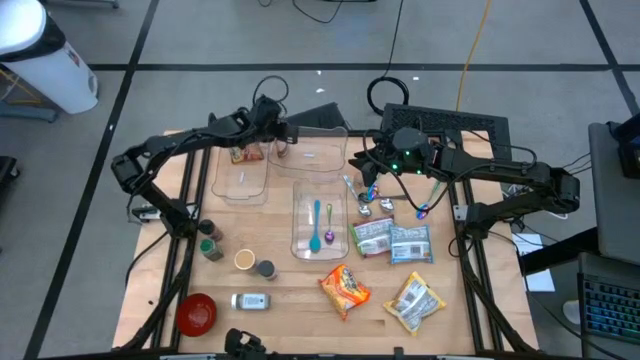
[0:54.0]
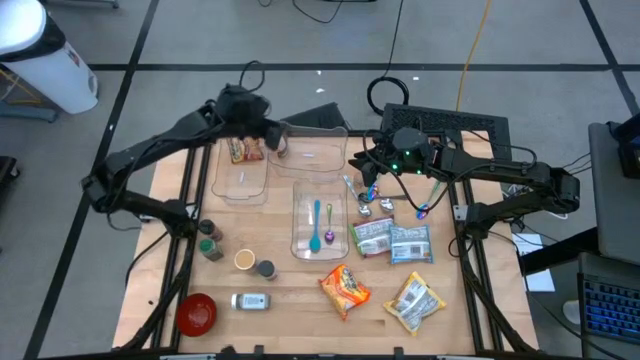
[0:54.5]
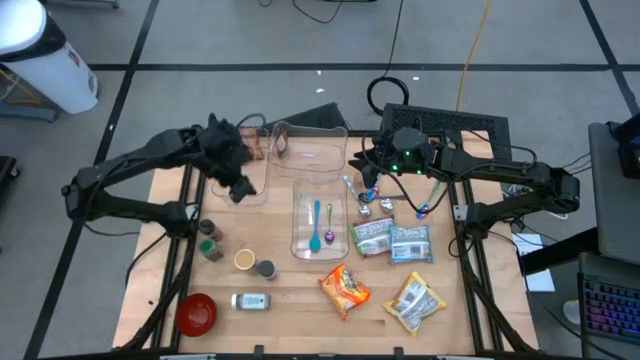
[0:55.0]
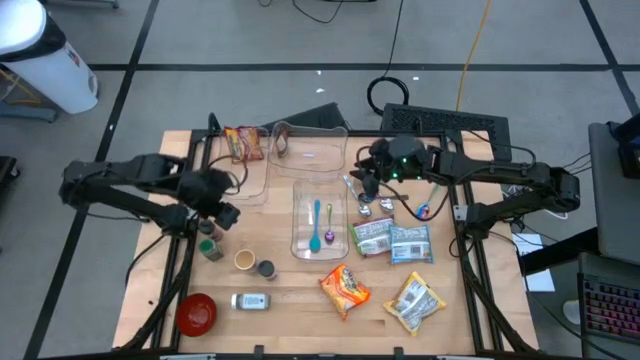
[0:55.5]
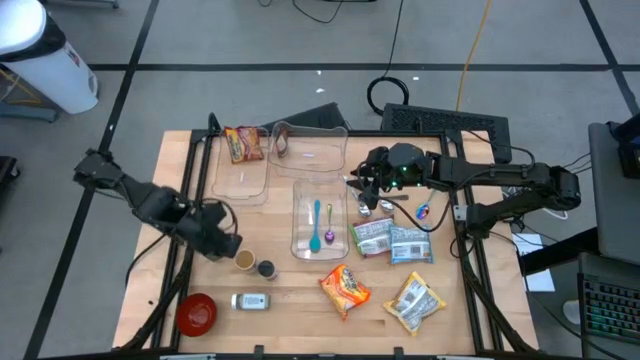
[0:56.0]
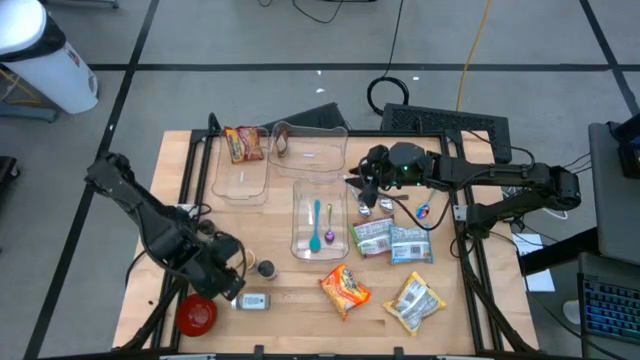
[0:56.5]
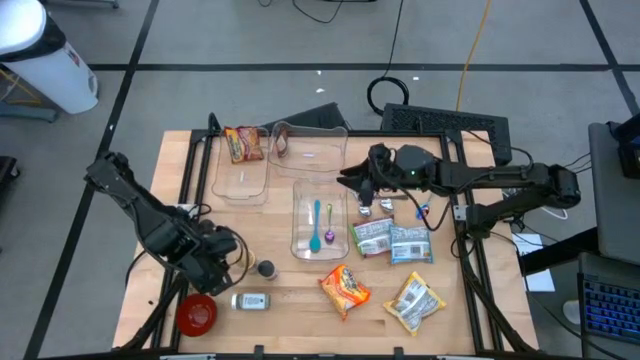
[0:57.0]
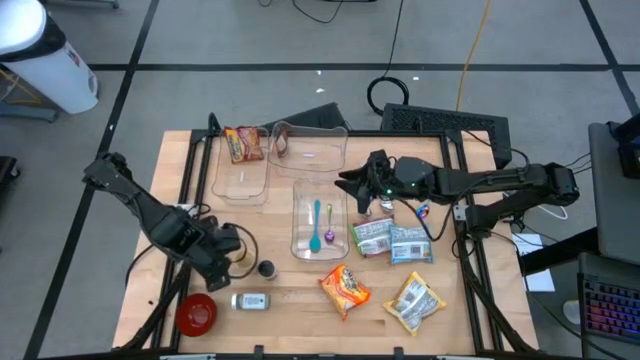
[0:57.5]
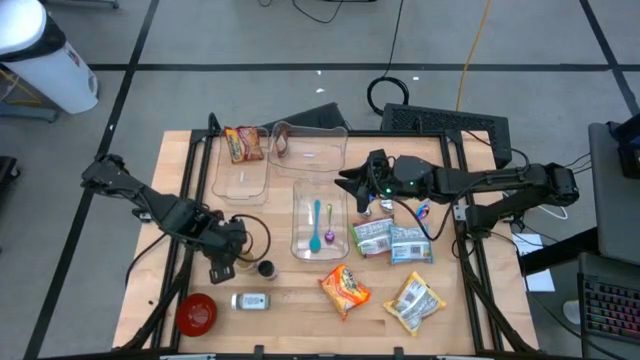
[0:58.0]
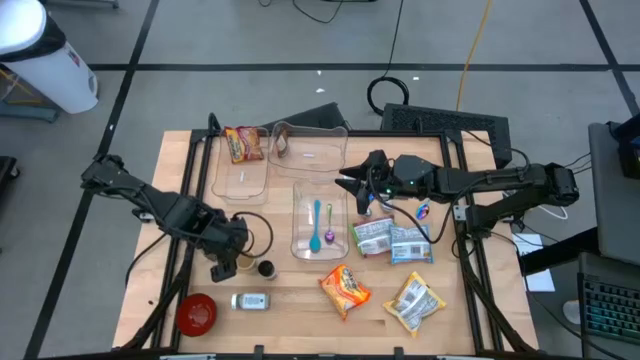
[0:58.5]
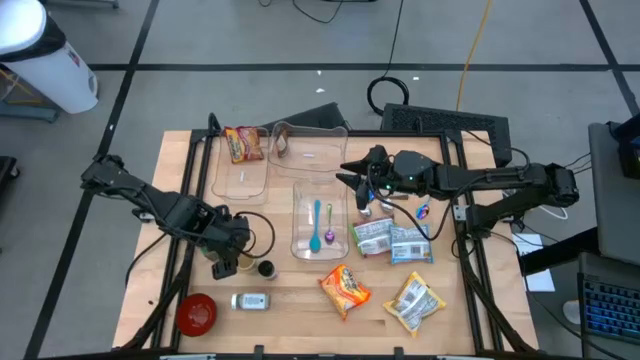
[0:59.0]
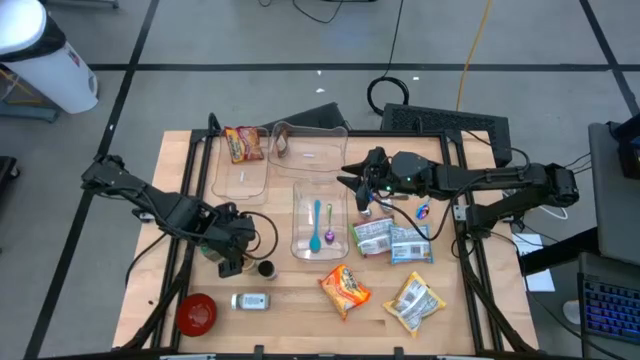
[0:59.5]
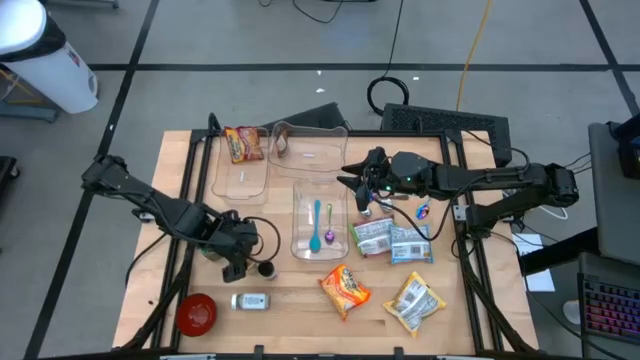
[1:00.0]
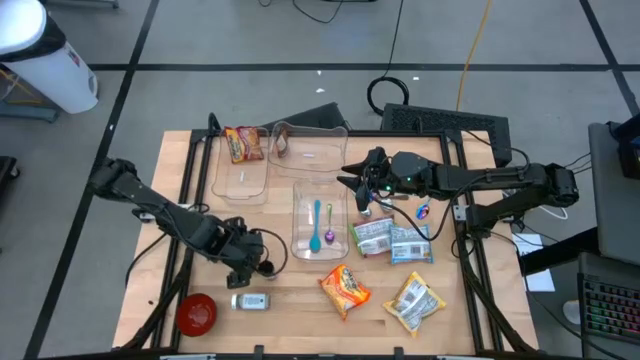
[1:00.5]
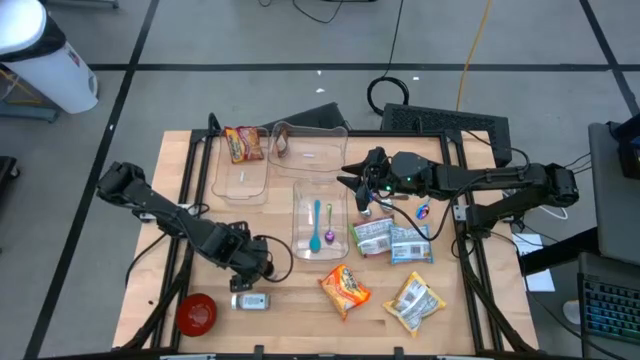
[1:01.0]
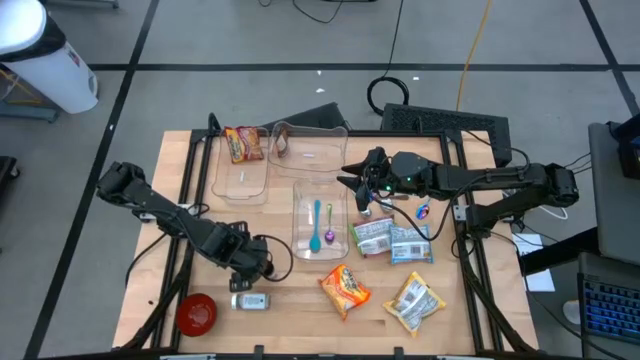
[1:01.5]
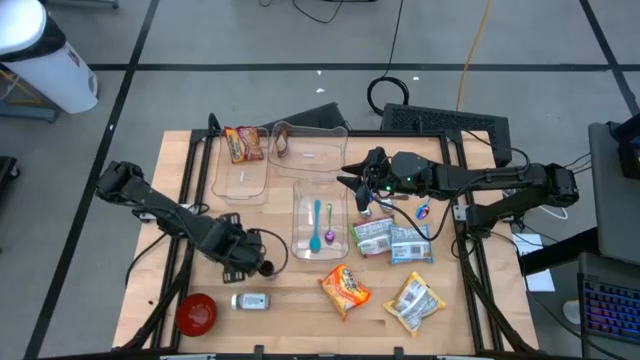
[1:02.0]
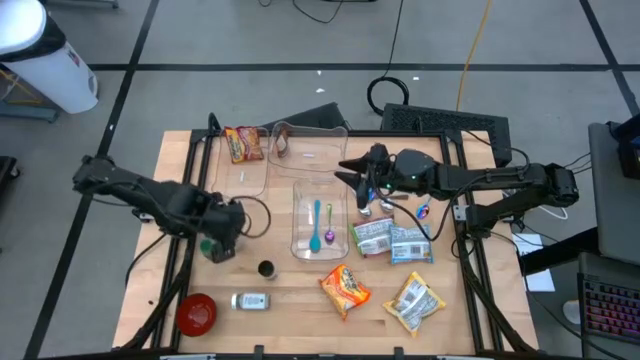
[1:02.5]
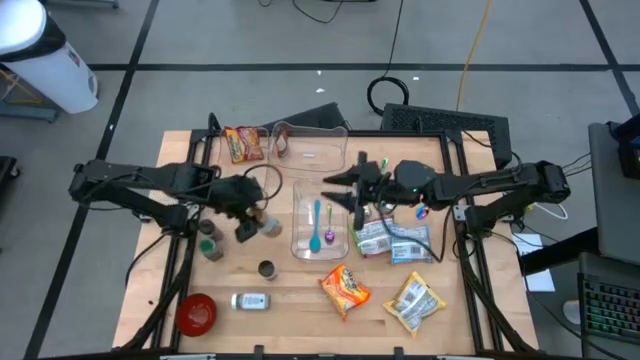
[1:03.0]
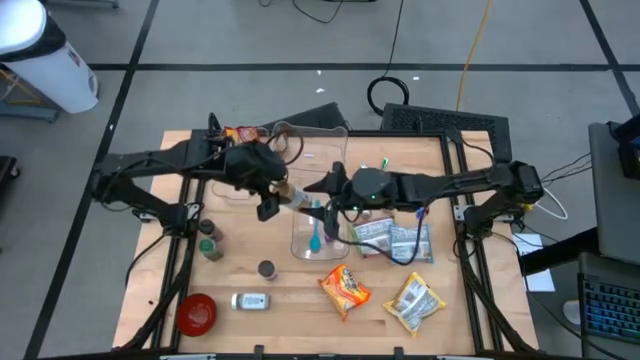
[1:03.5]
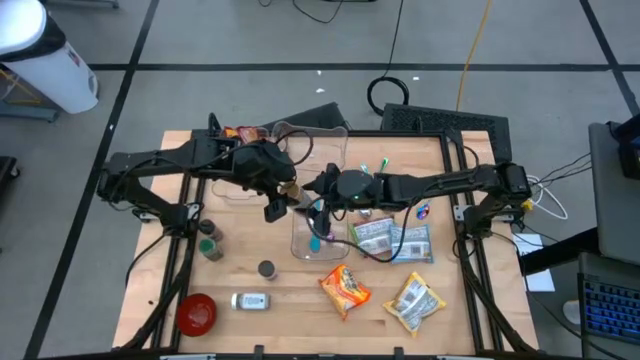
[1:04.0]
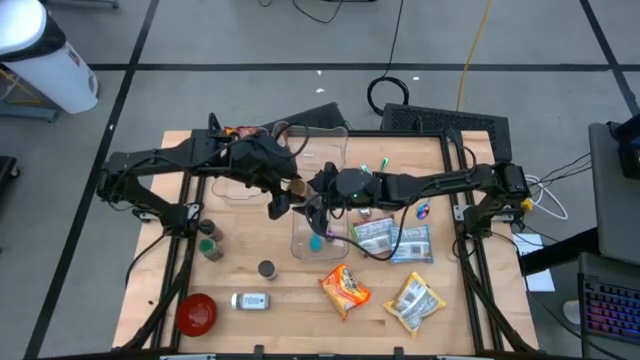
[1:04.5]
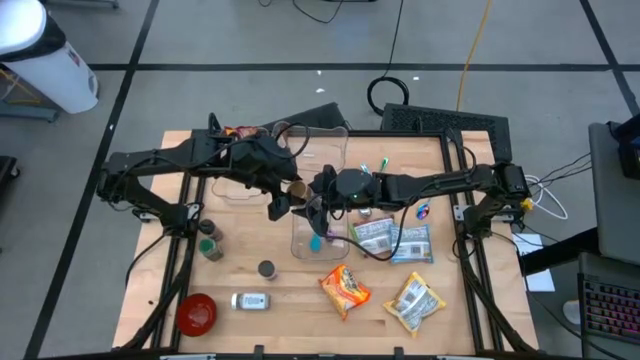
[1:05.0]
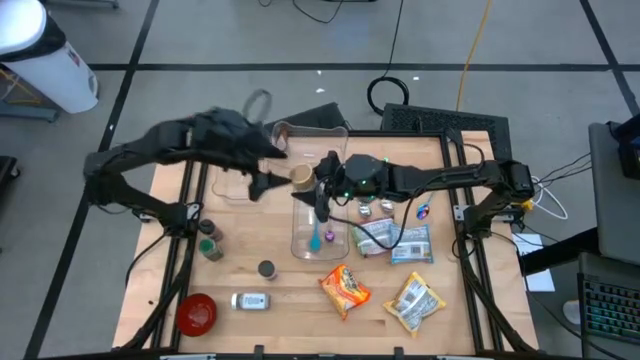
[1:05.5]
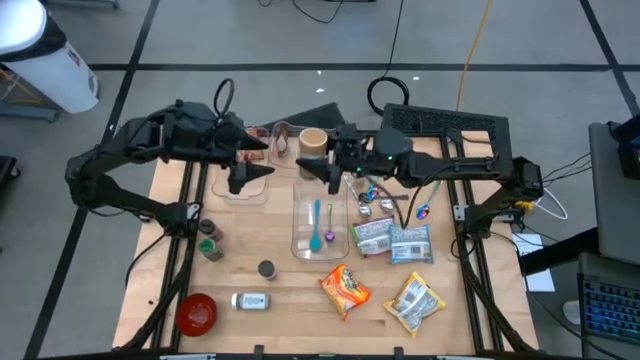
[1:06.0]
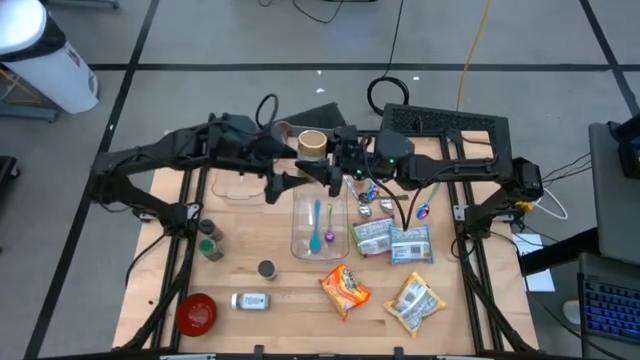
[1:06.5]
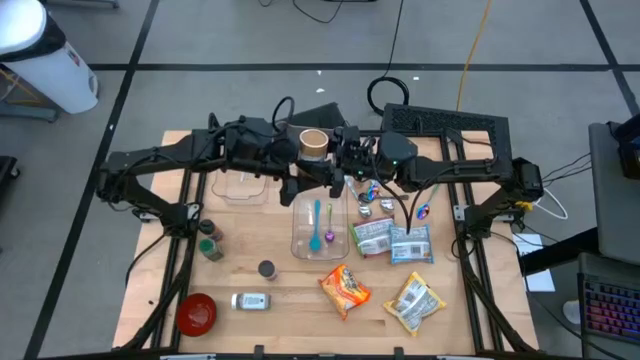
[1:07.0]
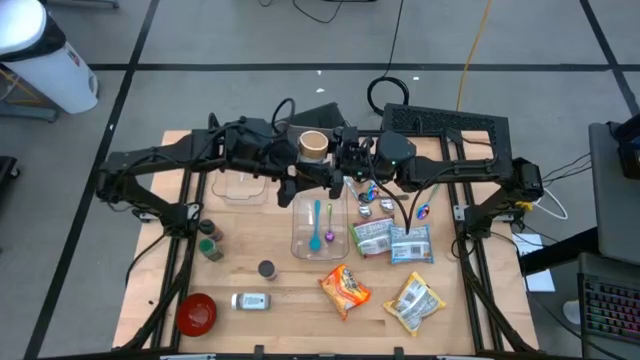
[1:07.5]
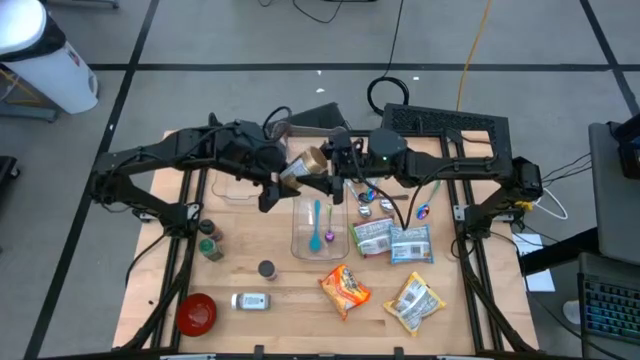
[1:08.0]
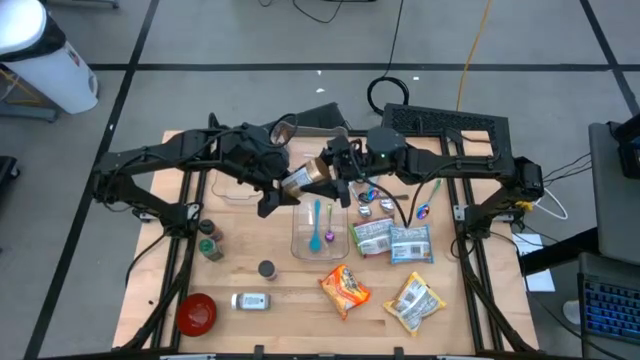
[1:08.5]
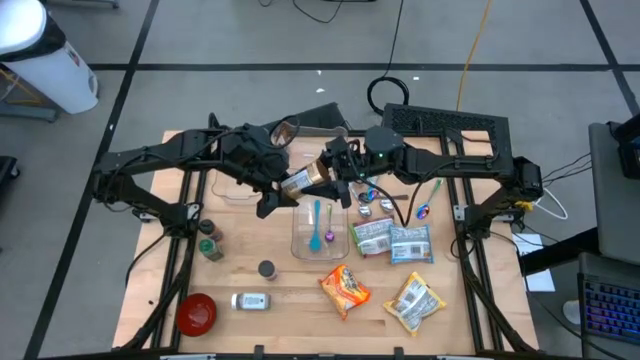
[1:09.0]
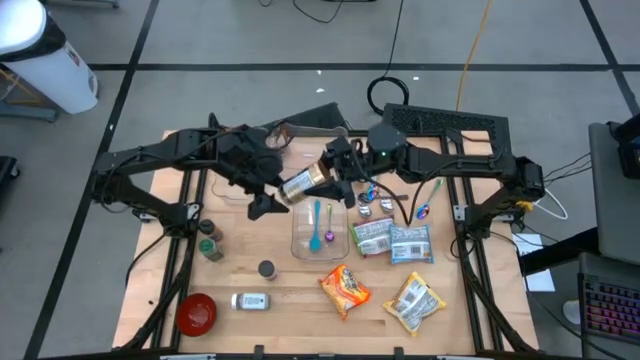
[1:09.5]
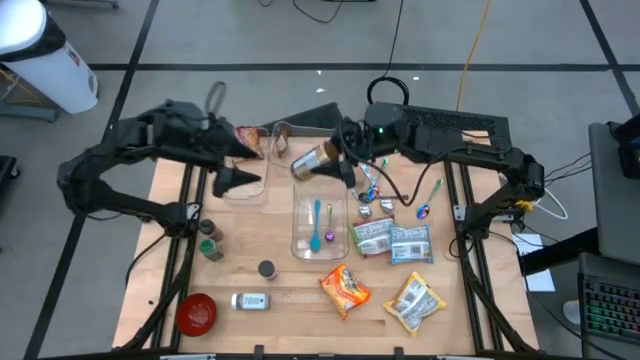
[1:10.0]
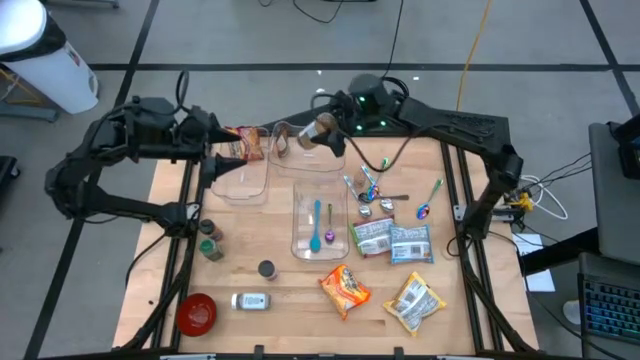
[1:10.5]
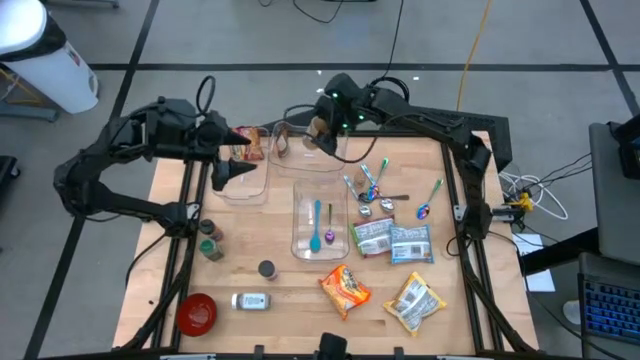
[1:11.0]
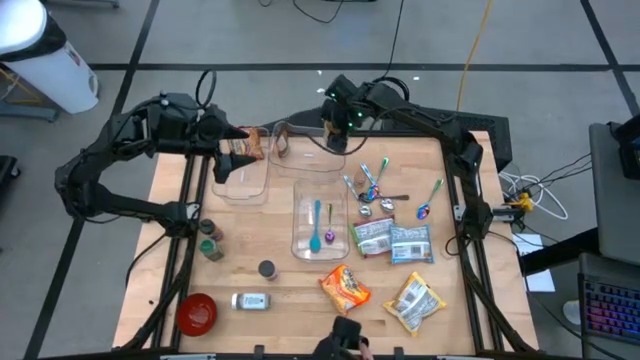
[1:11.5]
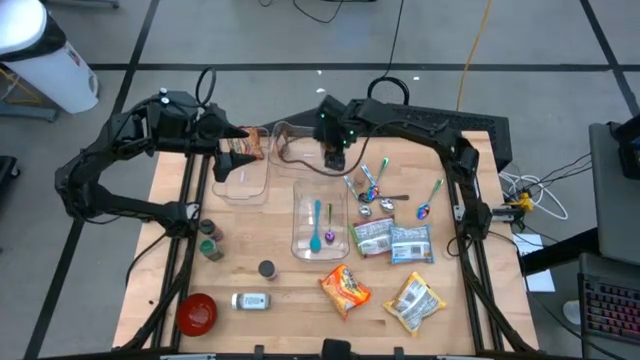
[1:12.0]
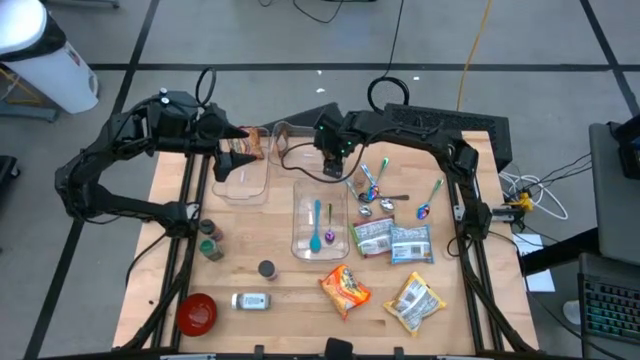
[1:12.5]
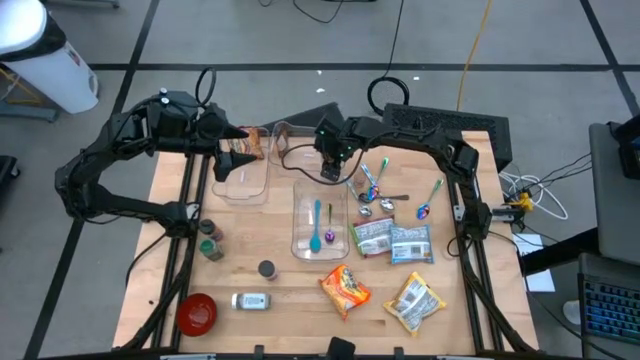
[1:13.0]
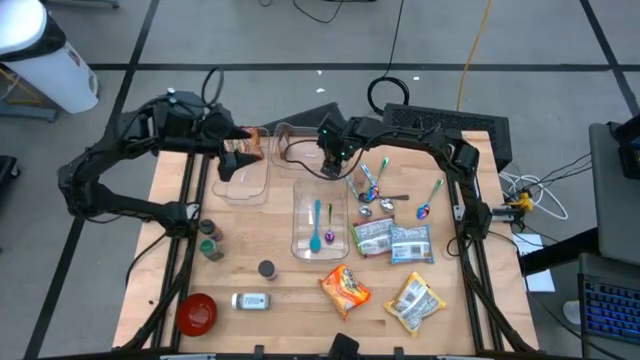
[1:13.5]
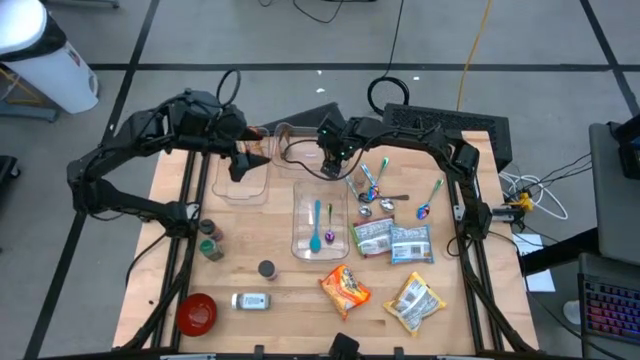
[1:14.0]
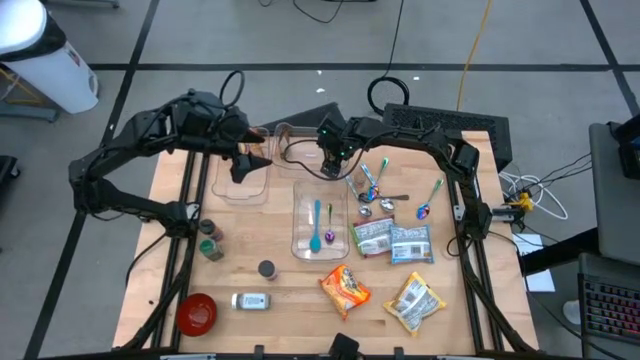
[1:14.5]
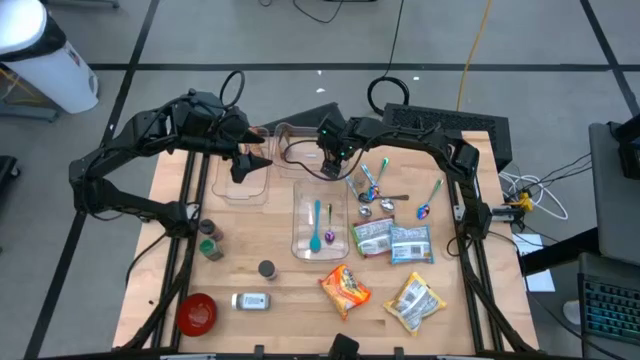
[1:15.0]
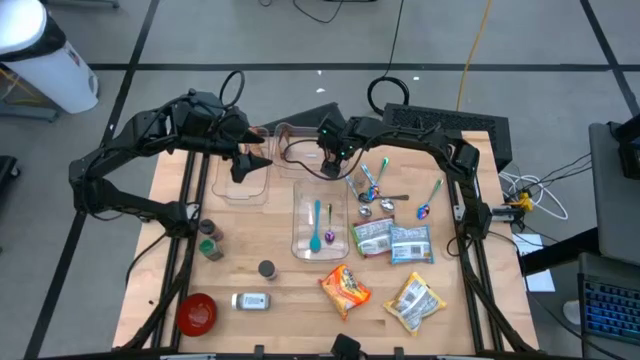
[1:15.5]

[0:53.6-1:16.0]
Task: Pick & Place Food Item
Put the gold seasoning bottle into the top right transparent bin
